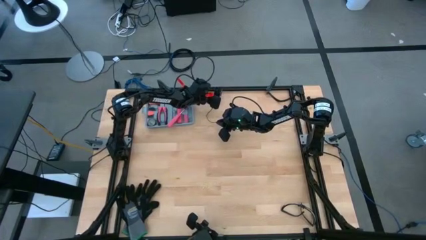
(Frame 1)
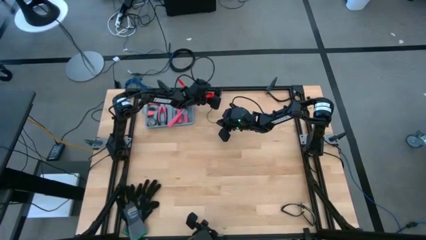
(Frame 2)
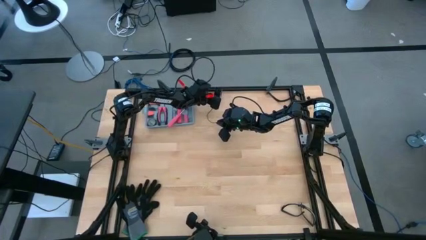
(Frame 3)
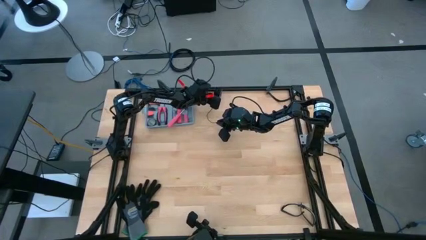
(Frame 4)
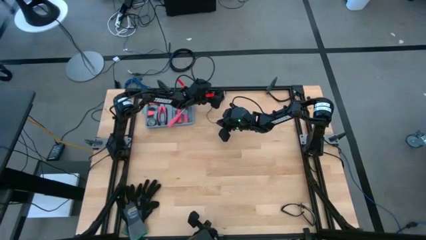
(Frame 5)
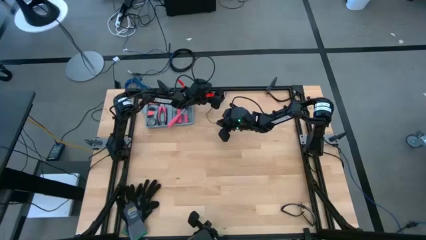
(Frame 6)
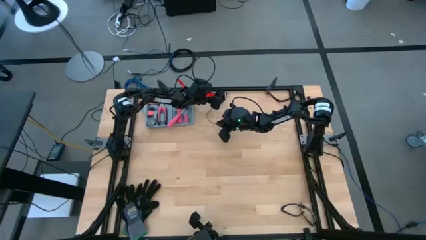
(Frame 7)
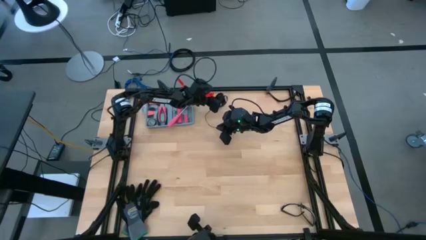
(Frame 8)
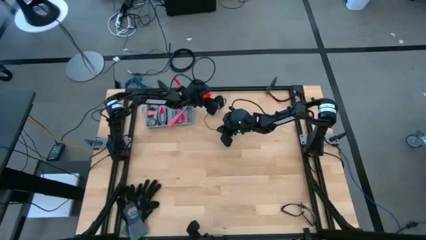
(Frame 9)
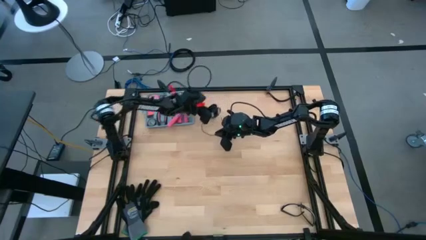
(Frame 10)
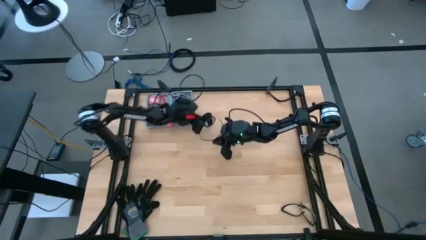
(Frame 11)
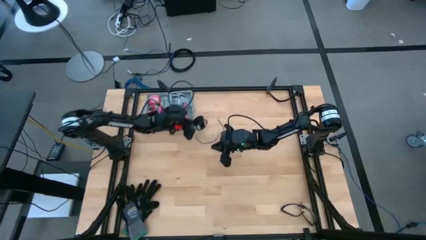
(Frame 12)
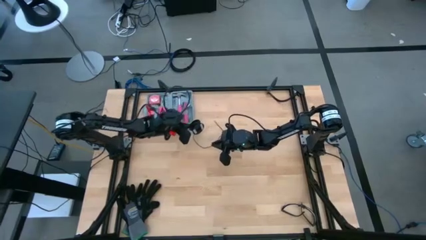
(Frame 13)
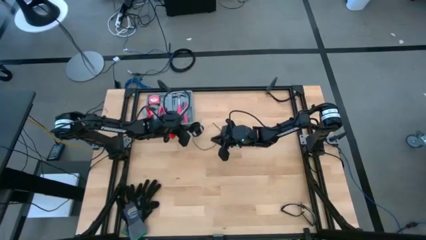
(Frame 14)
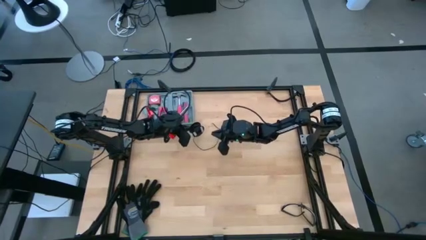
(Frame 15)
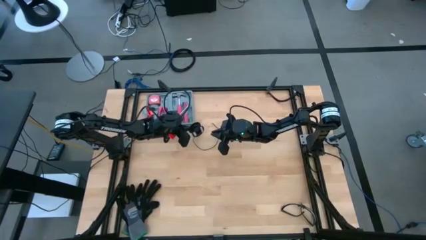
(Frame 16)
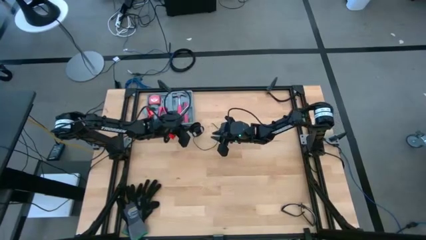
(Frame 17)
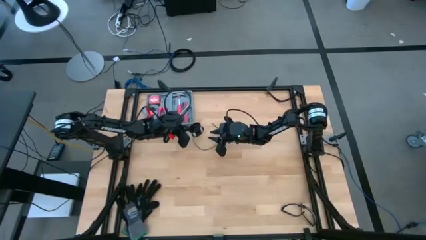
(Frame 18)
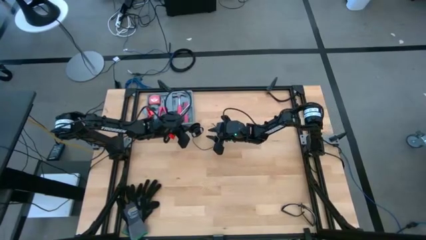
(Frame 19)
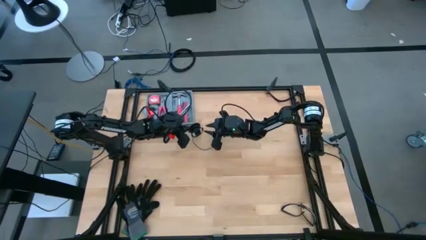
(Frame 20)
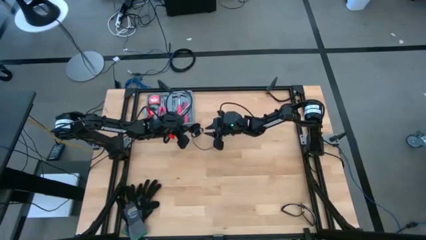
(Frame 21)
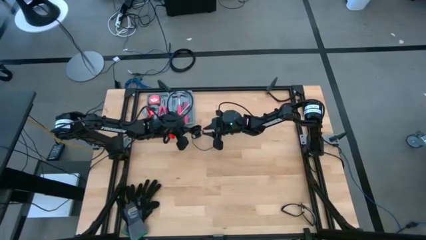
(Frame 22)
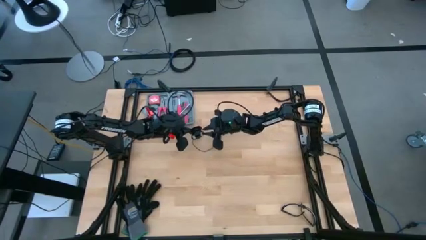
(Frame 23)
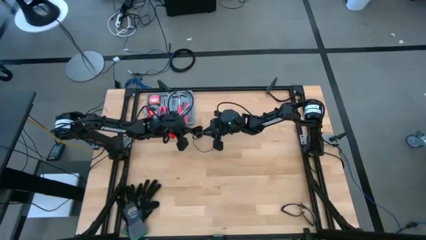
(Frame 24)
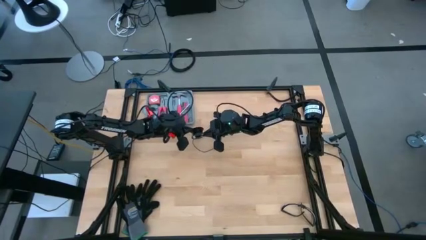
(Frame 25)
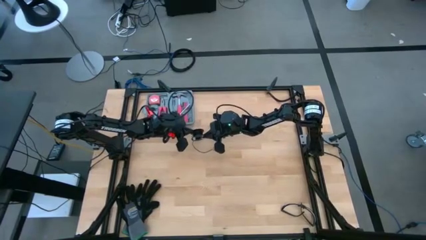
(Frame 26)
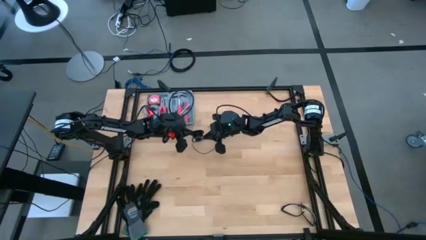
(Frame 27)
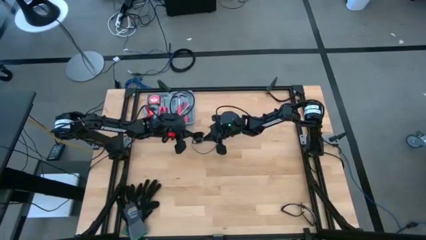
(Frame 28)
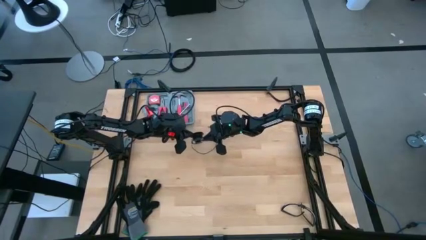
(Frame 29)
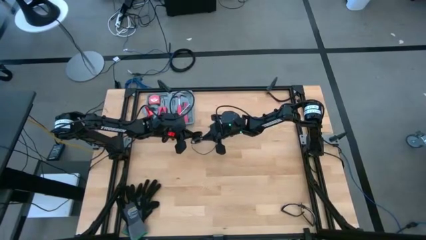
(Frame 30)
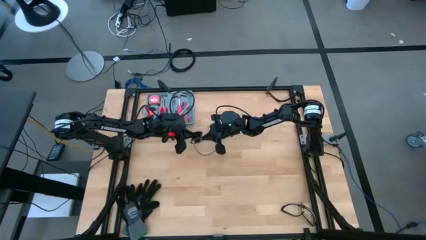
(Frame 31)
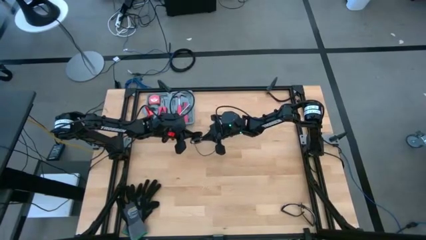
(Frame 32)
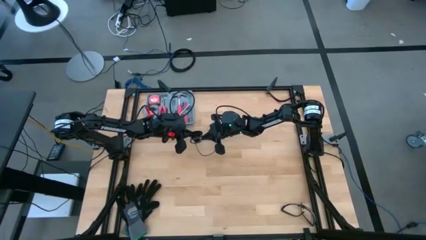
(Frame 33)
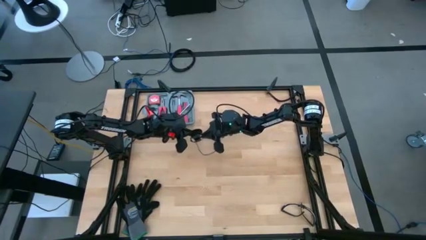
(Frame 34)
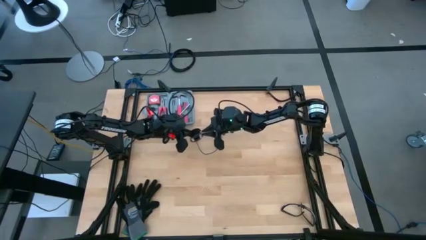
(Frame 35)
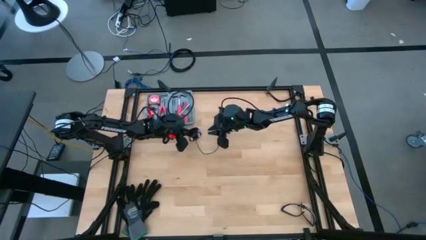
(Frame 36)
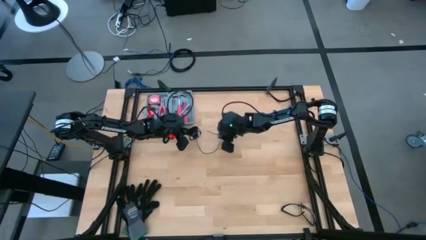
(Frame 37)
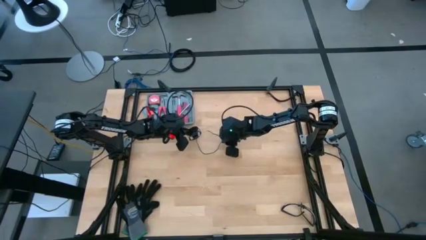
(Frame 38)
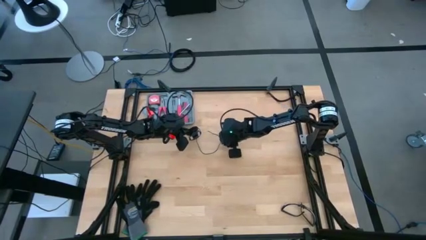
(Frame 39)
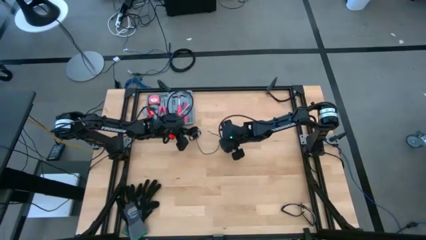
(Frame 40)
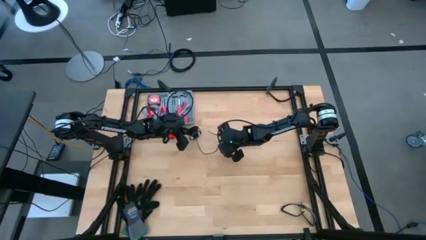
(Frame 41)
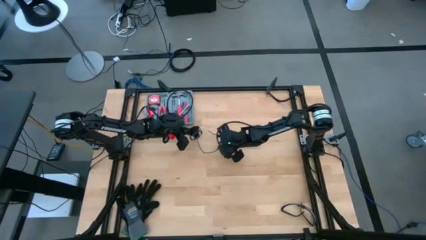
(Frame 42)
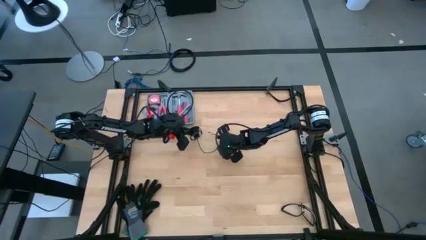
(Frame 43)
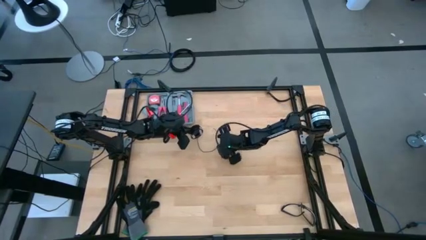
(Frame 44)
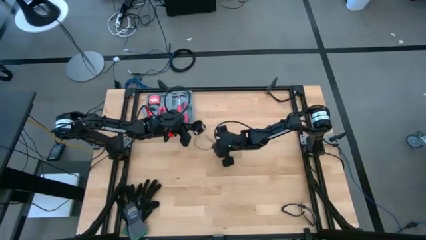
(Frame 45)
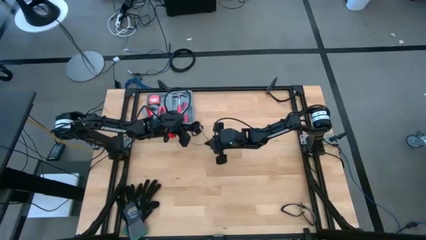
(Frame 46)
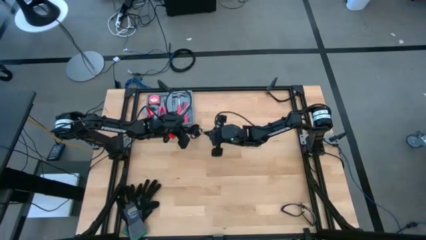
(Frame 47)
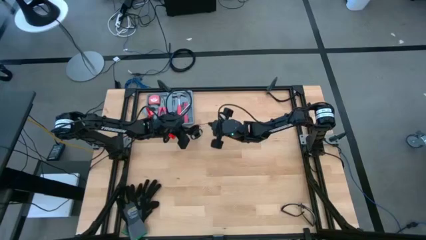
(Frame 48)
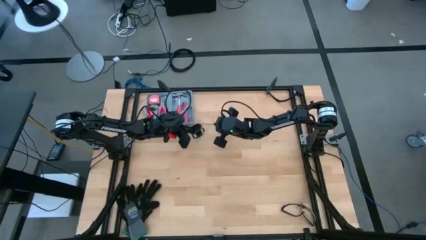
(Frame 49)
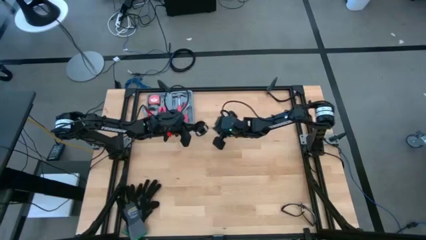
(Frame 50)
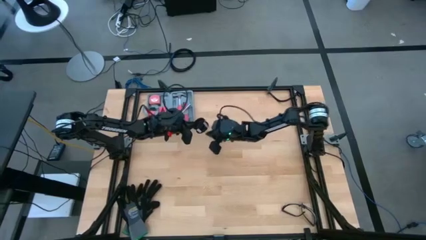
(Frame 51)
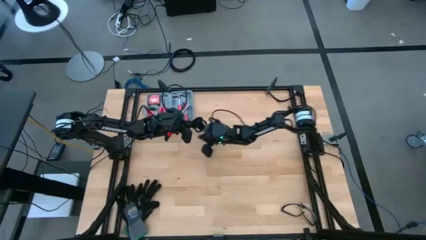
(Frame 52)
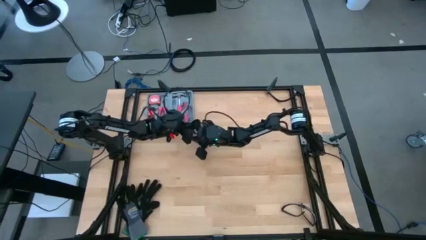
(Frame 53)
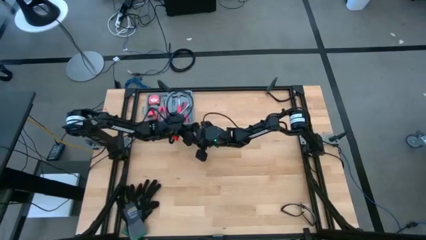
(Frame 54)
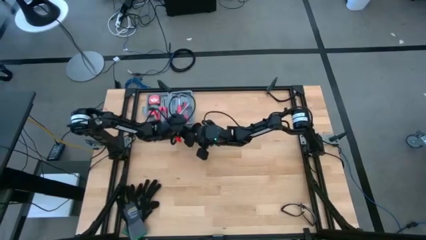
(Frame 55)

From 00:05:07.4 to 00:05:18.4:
Task: Coil cords
Coil the black wire onto the spool

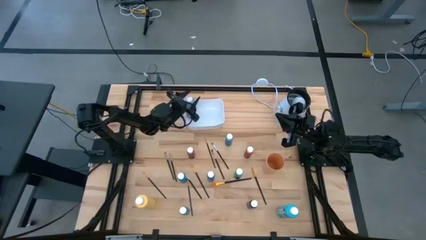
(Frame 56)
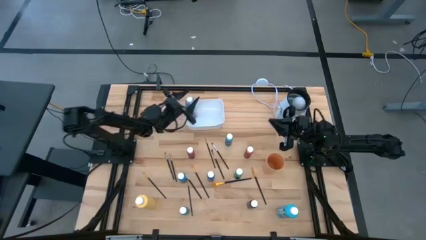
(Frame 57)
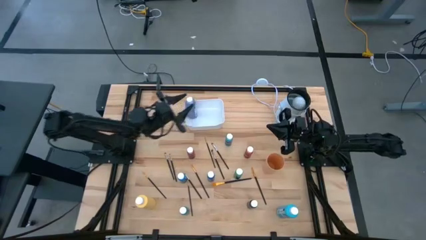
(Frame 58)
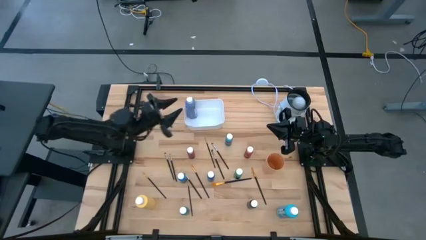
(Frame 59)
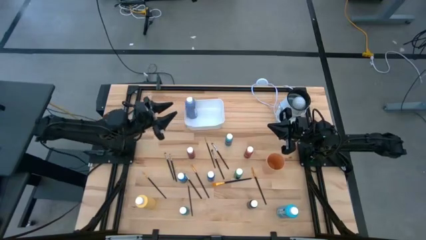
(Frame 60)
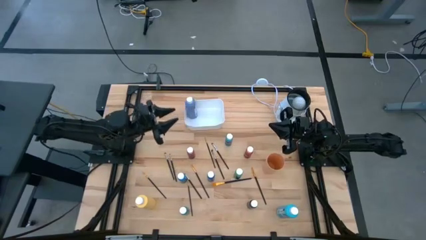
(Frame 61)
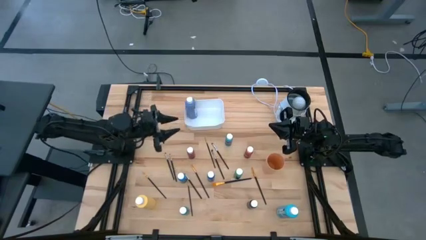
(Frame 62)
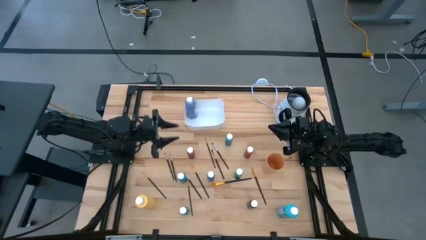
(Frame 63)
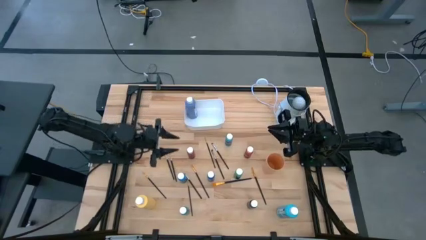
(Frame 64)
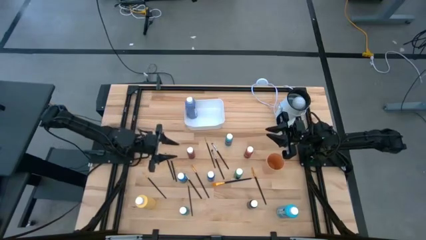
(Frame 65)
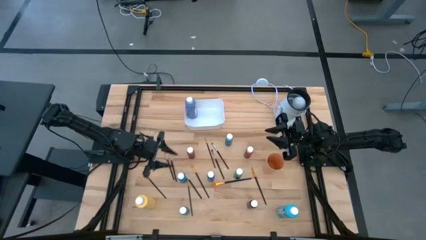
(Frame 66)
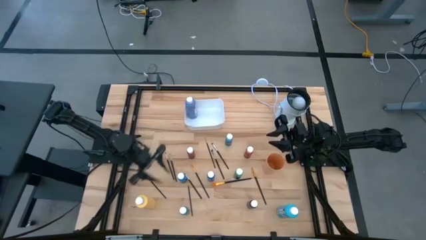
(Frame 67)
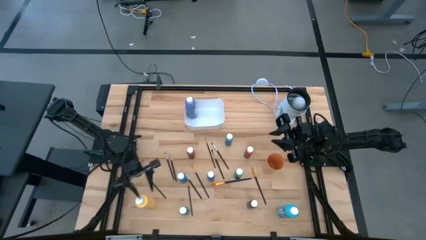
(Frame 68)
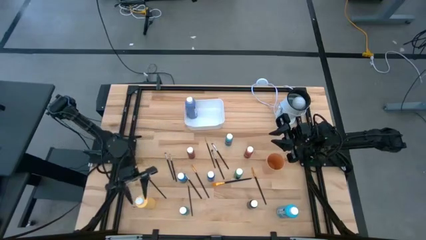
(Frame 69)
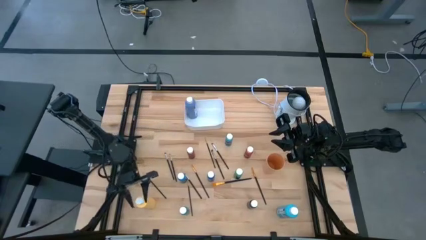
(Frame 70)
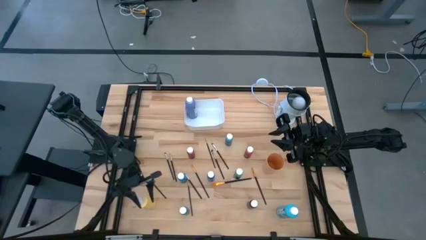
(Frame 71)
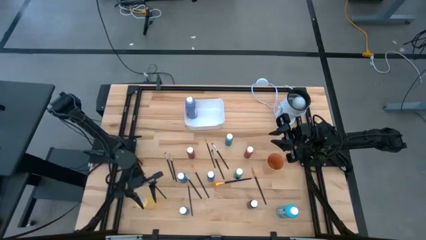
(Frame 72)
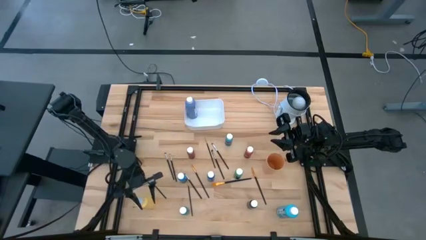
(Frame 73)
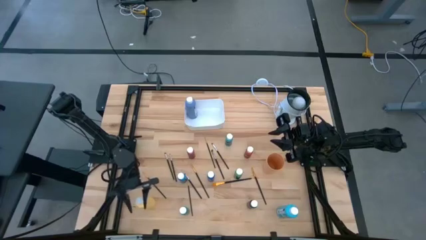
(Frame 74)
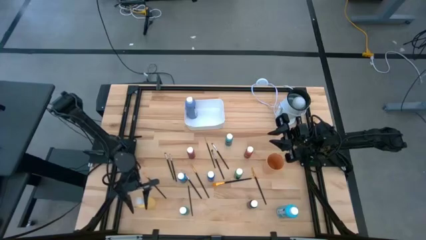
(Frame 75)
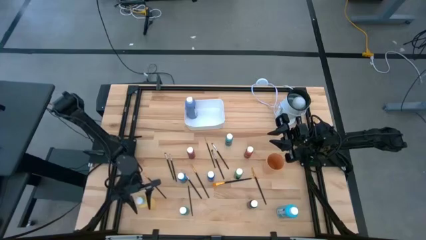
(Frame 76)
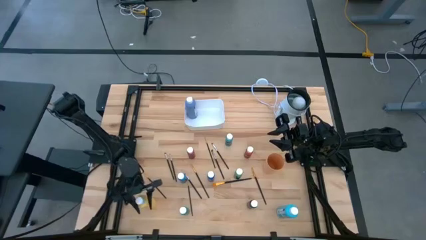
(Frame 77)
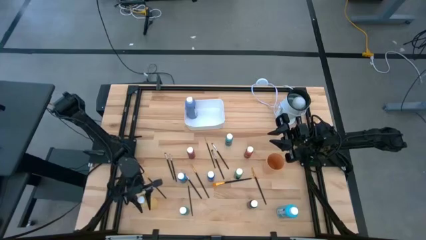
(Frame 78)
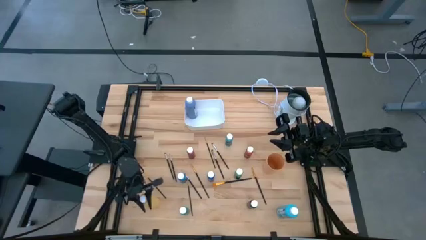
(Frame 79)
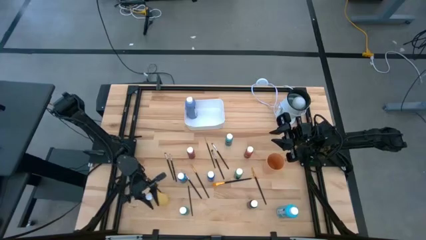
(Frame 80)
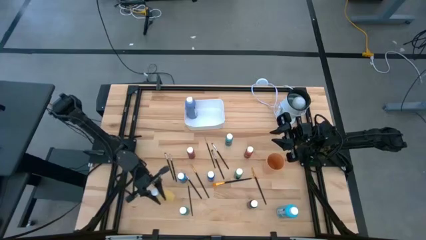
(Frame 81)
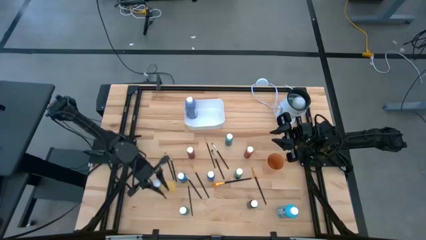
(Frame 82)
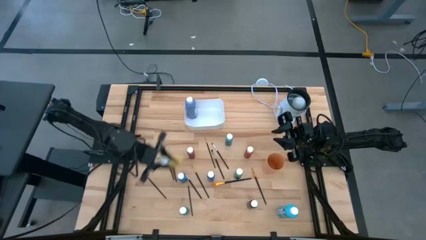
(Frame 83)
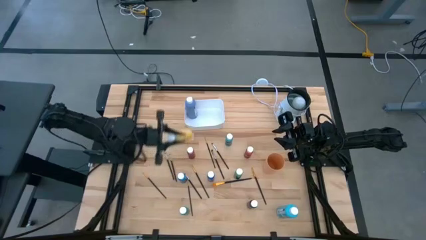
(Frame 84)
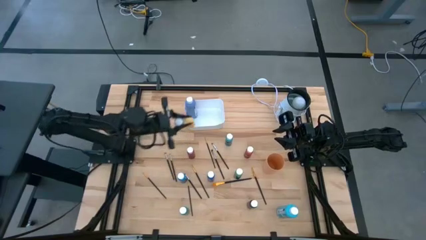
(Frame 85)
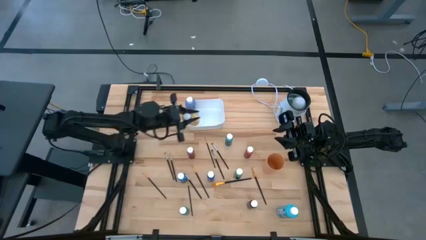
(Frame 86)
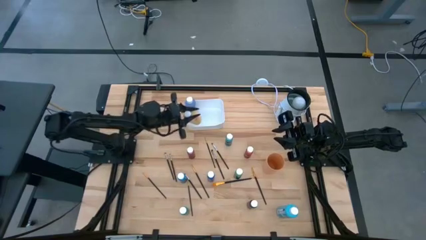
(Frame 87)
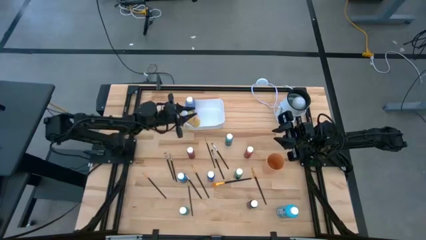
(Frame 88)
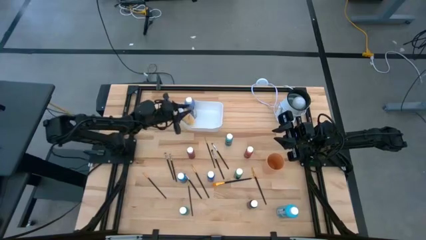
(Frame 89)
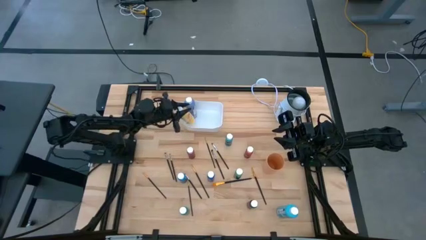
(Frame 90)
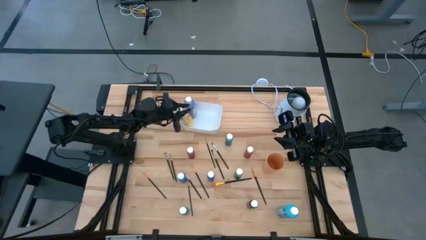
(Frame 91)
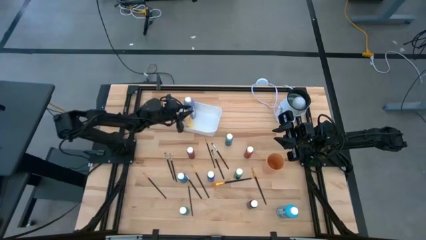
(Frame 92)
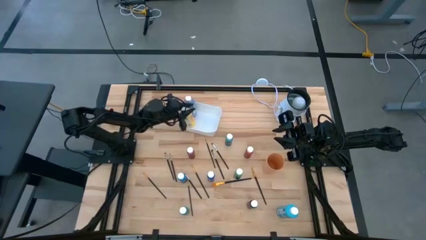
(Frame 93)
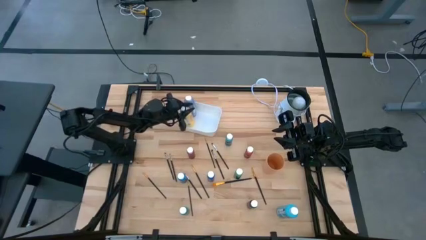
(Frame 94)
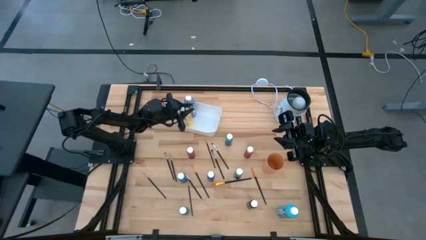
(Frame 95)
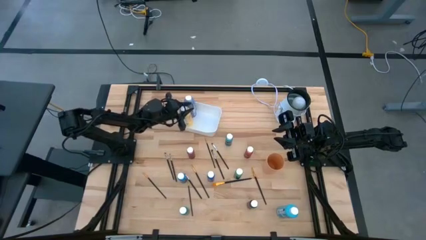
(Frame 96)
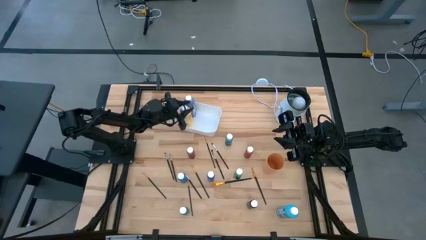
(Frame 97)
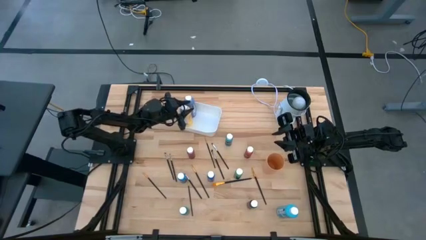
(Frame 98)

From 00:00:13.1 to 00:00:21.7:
Task: Pick & Place Paint Supplies
Put the yellow paint bottle into the white bin
